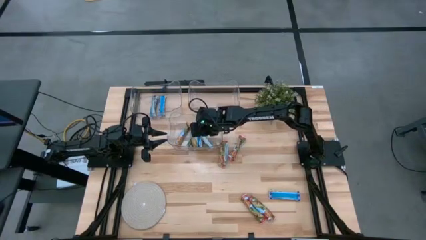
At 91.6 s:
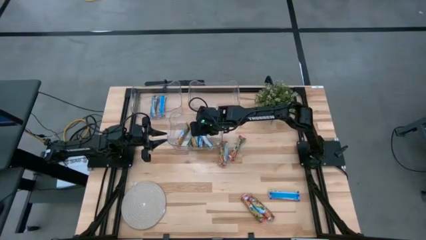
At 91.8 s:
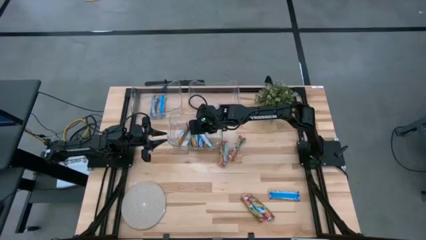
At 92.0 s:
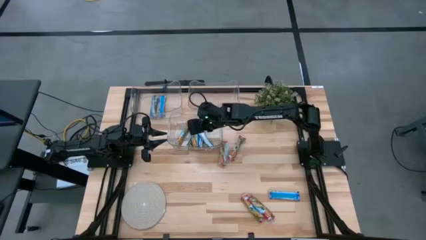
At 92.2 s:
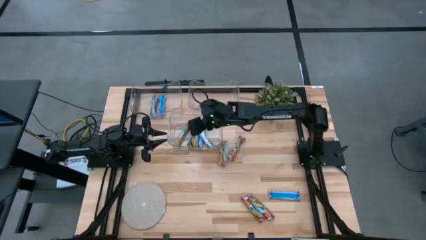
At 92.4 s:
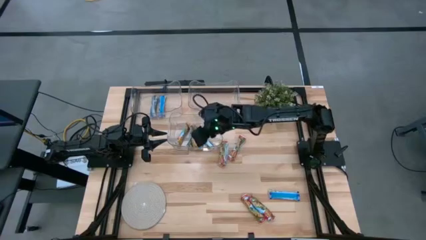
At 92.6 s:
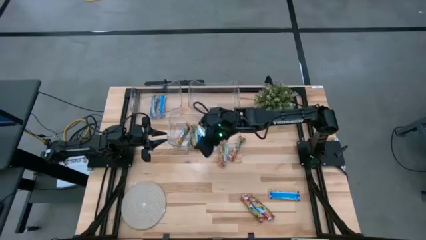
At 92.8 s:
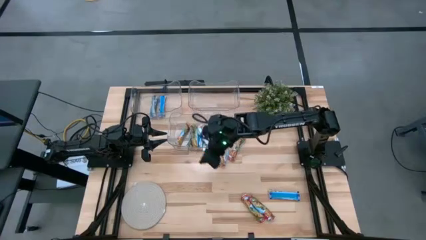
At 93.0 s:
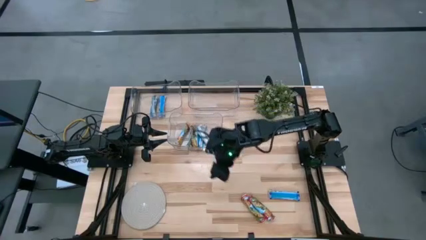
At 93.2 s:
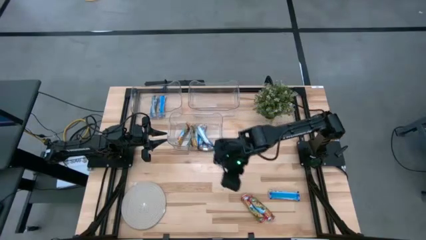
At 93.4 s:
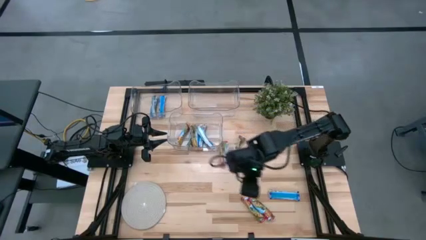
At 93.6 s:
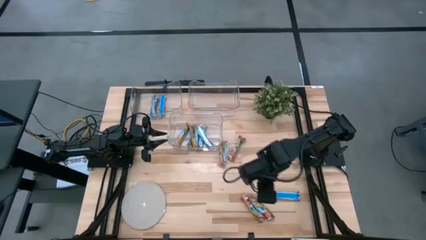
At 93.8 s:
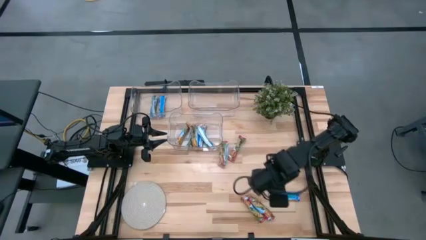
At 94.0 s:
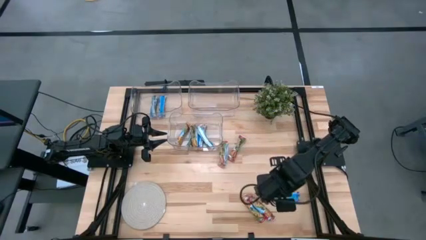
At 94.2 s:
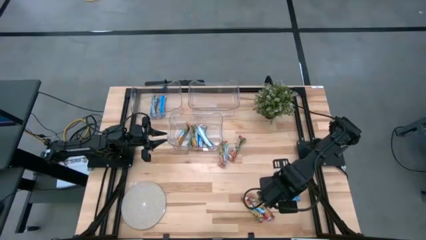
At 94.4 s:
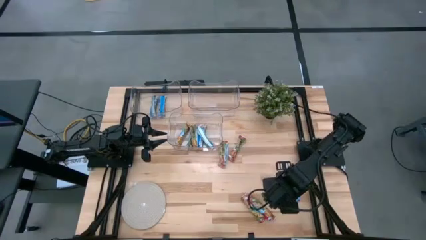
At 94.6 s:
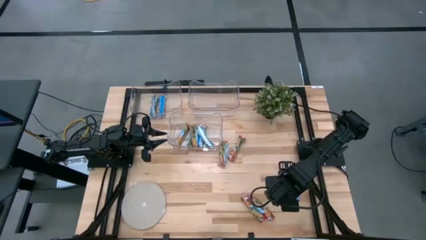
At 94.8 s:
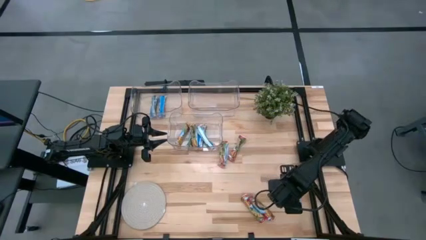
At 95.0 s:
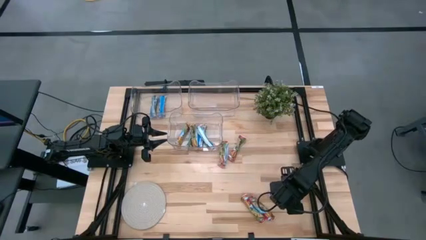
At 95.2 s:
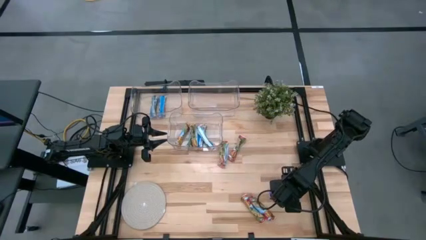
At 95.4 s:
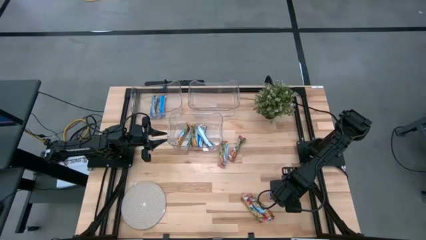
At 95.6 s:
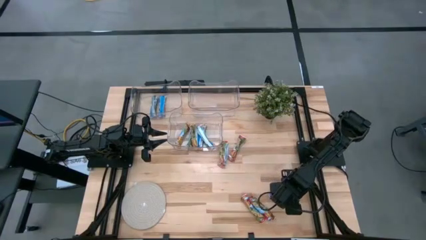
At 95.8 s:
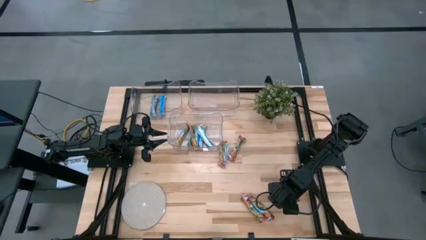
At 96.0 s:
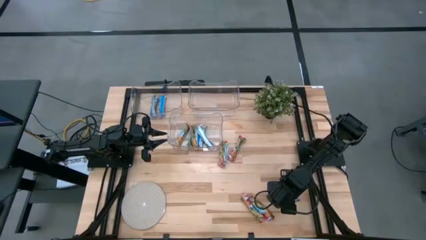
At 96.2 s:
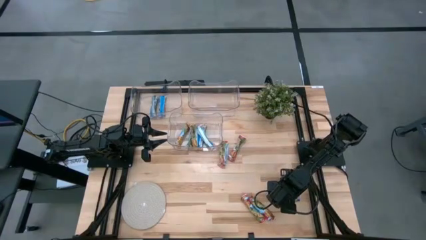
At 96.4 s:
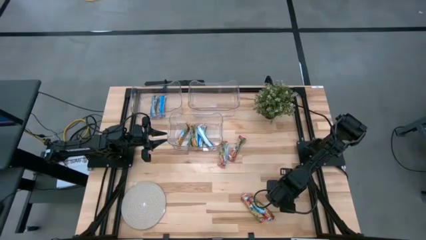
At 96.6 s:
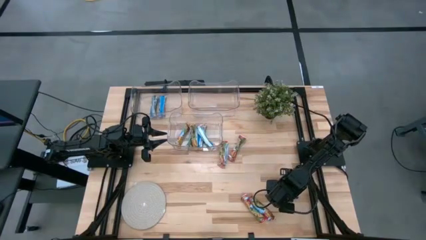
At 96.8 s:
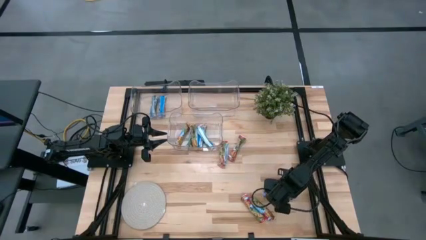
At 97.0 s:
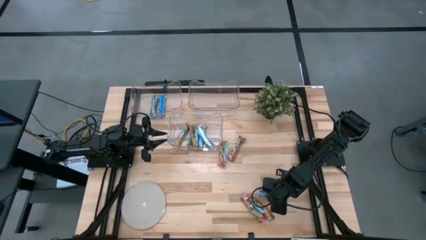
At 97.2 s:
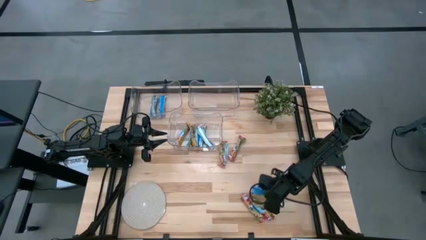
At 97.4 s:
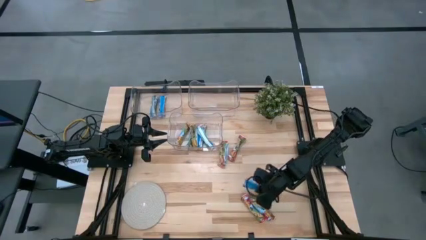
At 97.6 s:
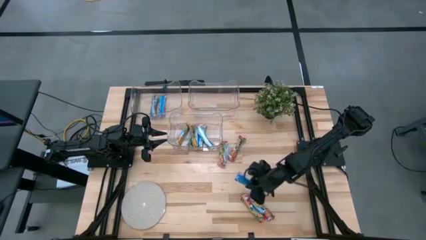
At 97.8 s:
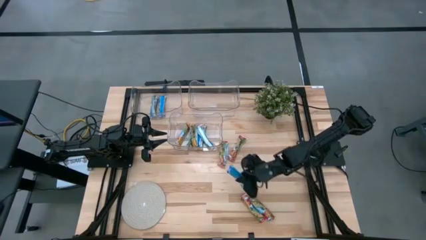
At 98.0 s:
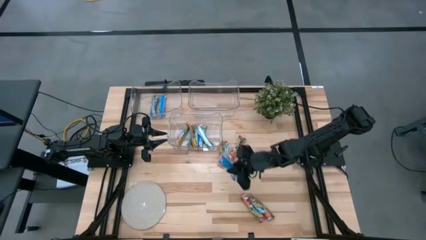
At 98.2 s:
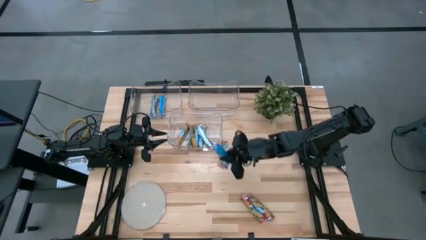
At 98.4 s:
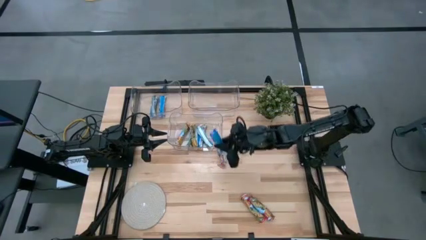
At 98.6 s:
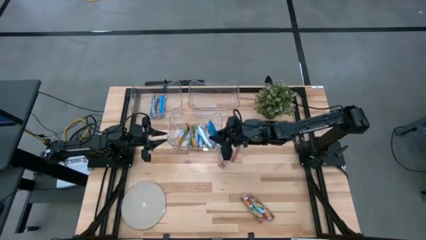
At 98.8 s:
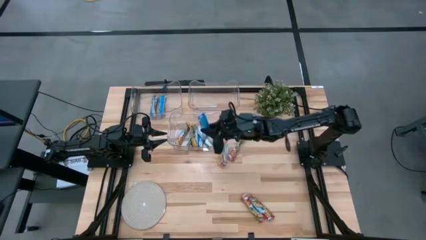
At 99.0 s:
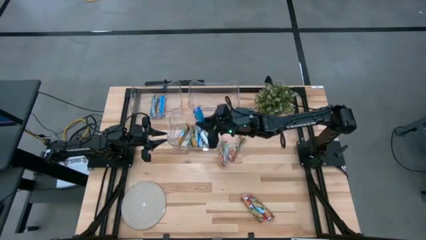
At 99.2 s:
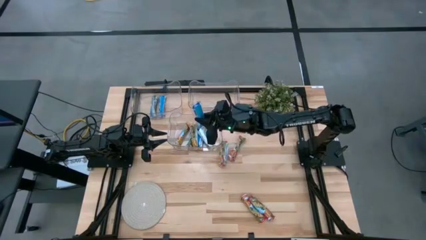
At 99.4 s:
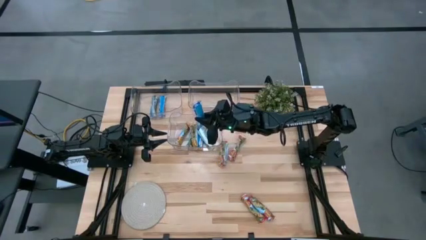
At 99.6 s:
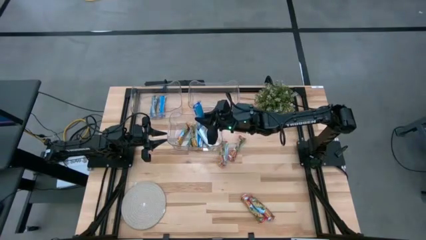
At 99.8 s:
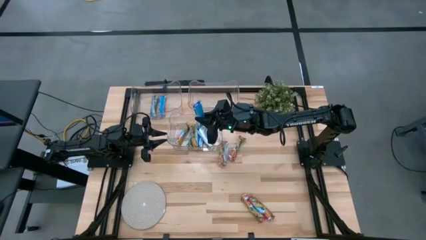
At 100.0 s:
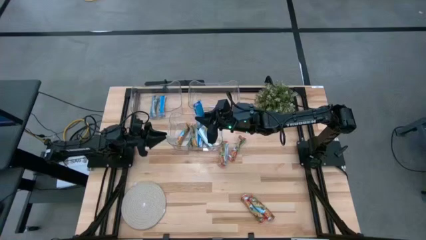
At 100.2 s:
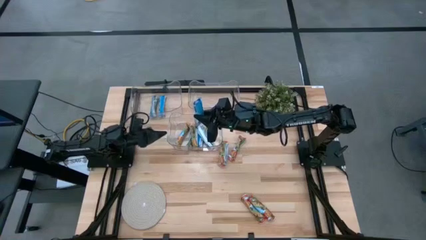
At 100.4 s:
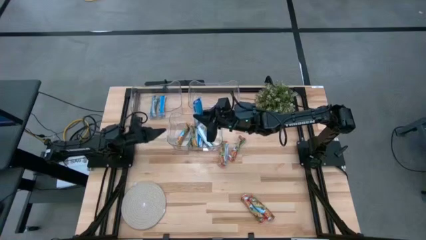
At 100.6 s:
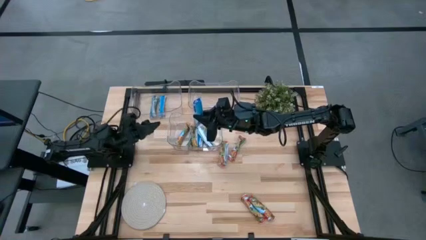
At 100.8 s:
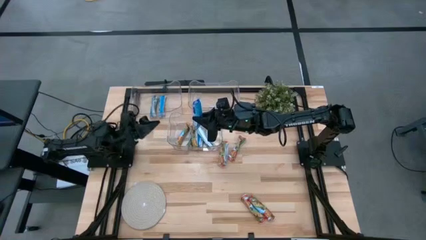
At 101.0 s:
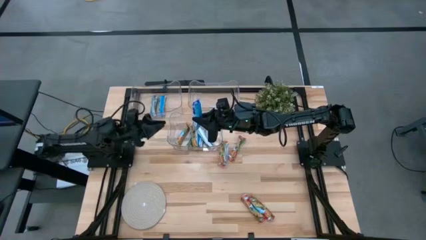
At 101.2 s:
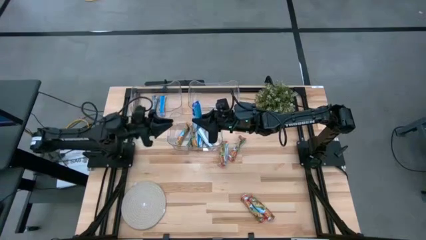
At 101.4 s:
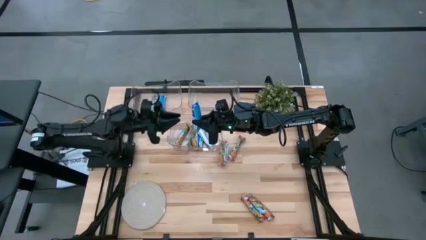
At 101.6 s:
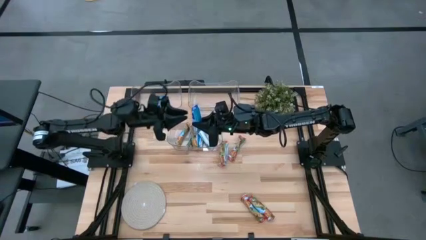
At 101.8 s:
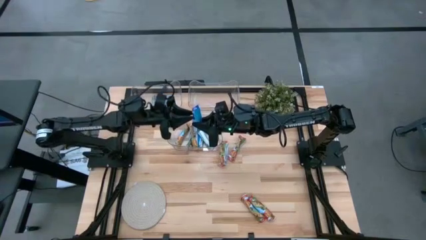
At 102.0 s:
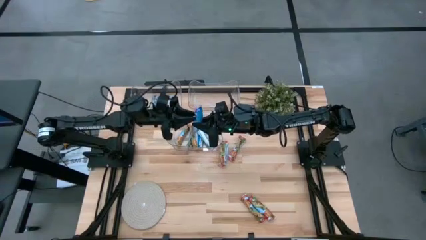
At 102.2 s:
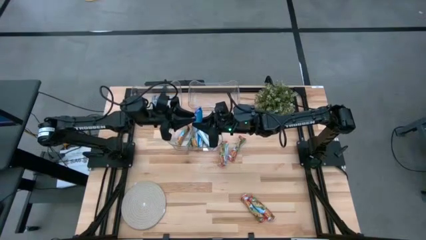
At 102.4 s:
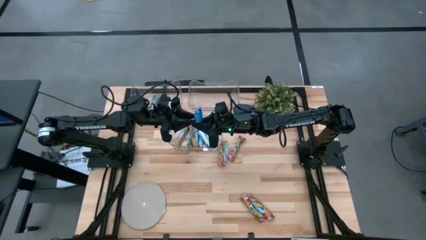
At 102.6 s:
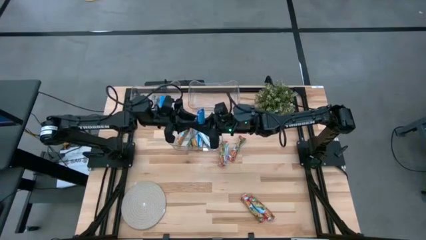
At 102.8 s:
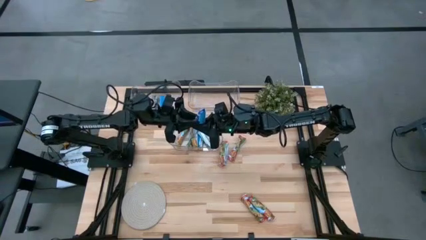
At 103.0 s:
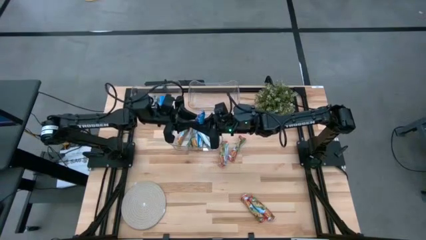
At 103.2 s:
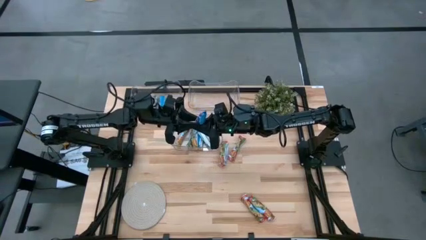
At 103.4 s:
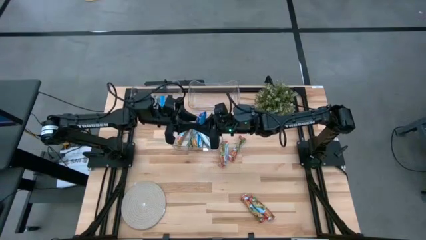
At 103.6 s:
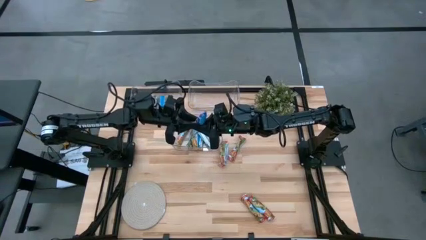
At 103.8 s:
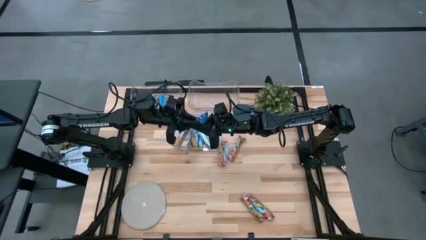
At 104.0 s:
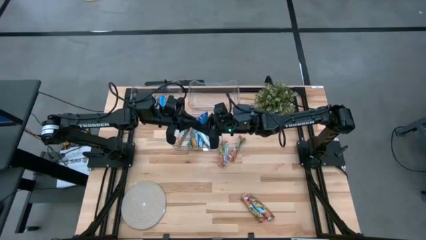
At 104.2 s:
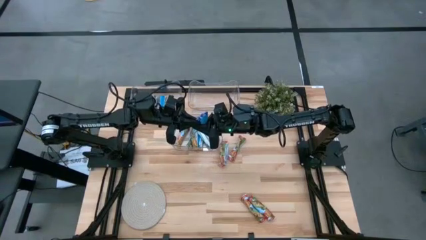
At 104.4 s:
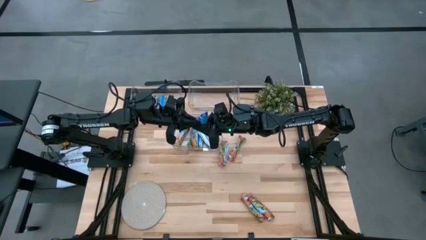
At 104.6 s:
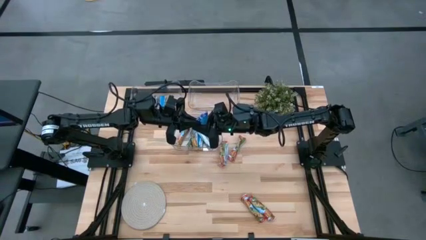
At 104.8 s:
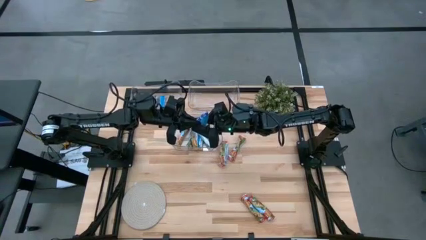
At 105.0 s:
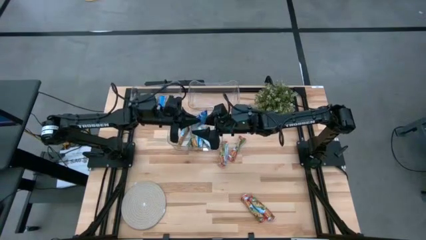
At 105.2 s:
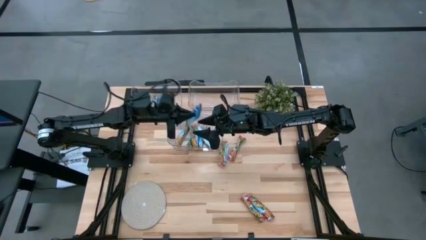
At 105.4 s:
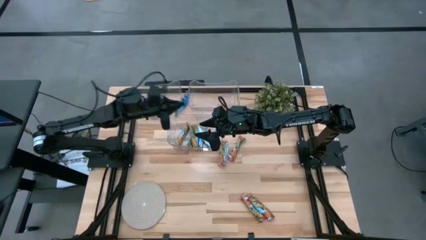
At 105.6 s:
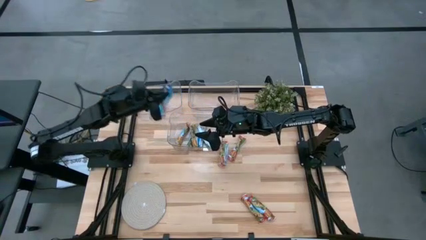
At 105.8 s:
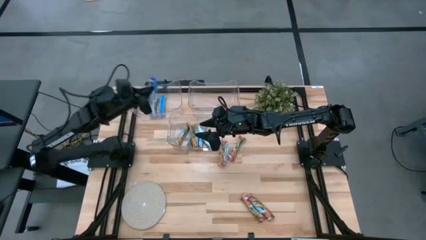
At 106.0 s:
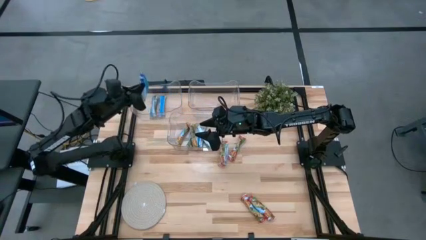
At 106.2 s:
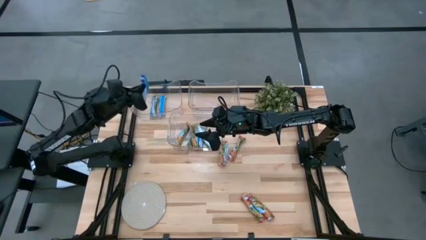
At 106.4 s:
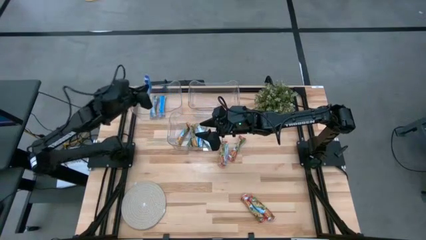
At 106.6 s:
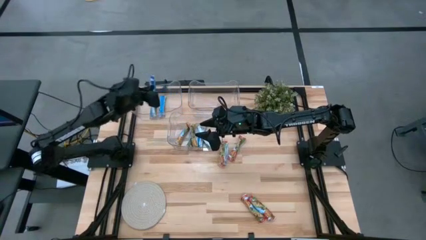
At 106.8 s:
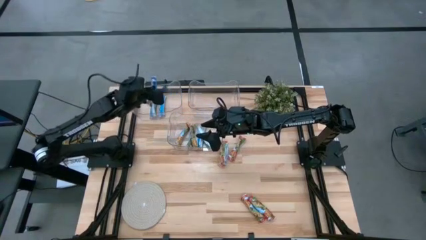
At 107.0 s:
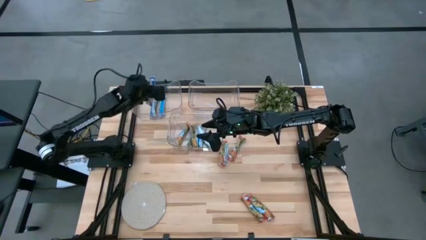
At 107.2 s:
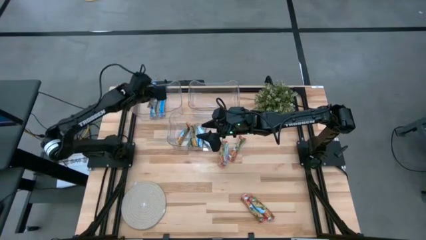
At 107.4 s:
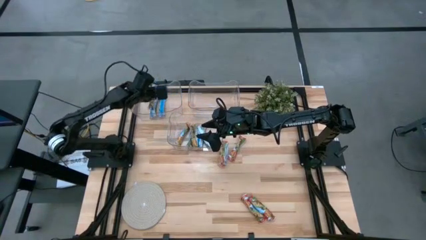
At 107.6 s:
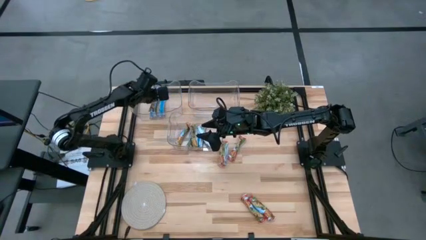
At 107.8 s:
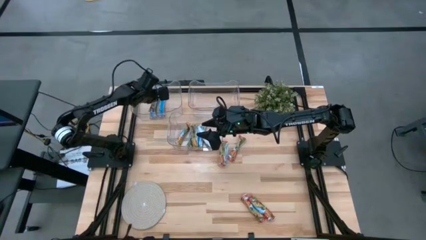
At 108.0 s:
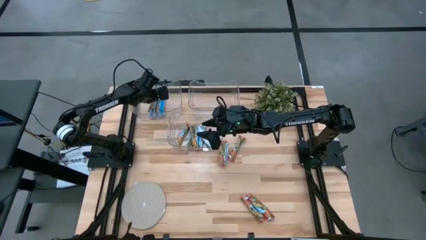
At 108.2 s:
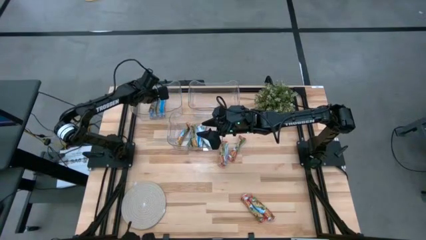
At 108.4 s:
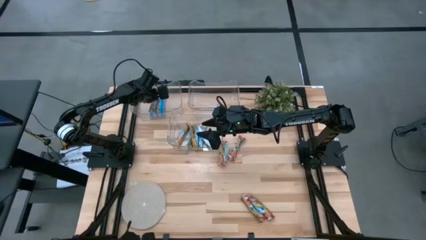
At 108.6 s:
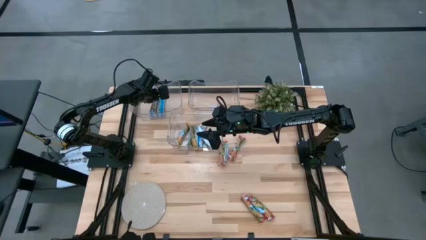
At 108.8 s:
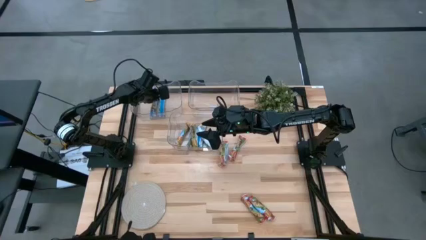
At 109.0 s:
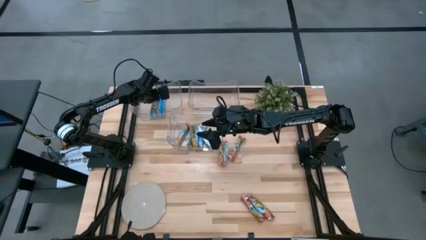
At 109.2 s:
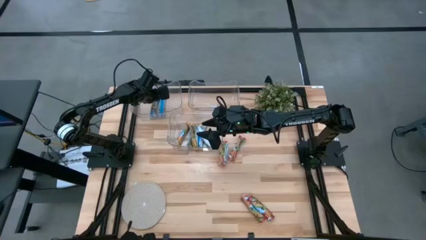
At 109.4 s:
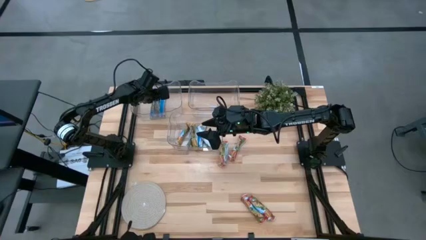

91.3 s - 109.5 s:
Task: Pick and place Granola Bars by type
Put the blue granola bar into the top left transparent bin
